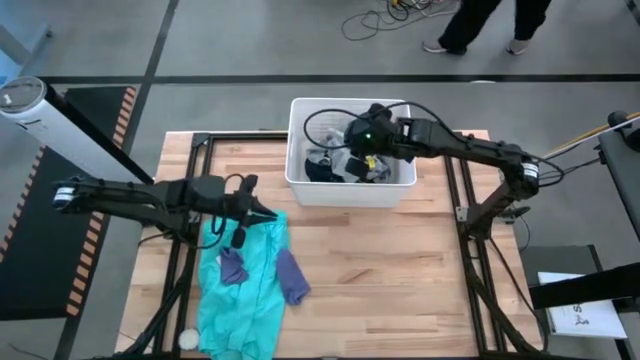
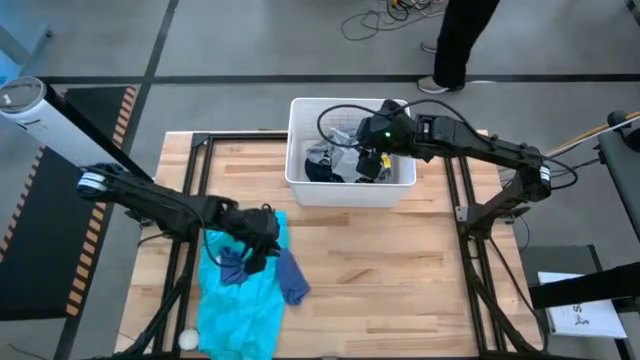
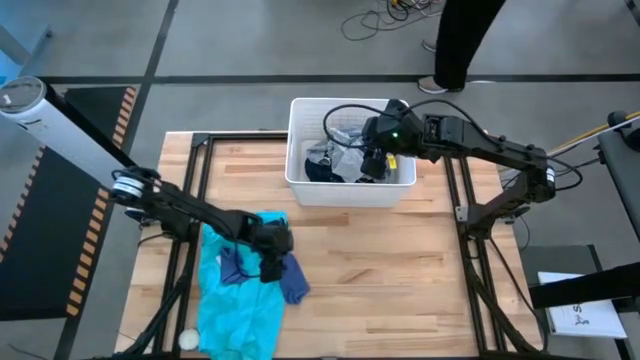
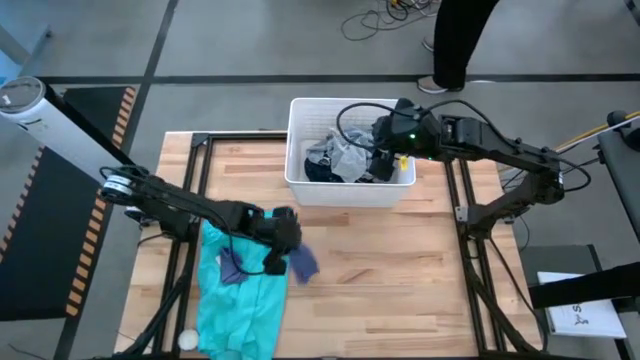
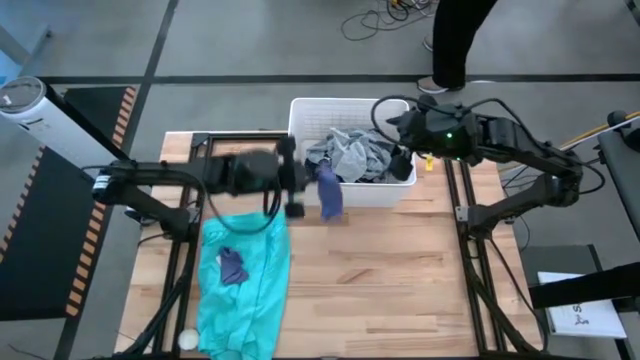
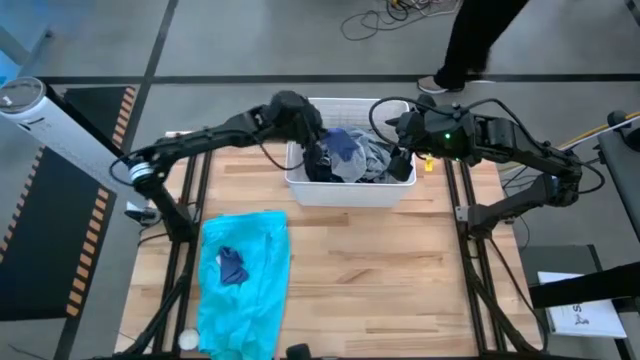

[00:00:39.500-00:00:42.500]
Task: Sort clothes
Put the right purple sock into the laundry bin

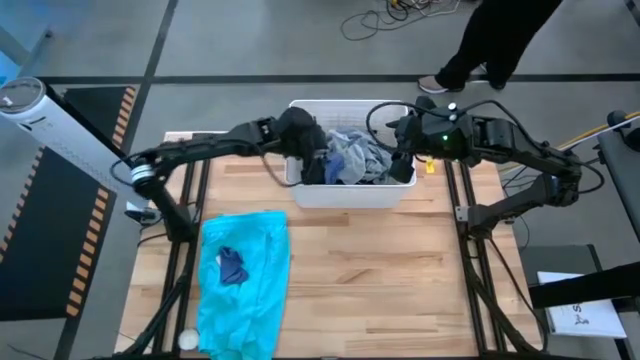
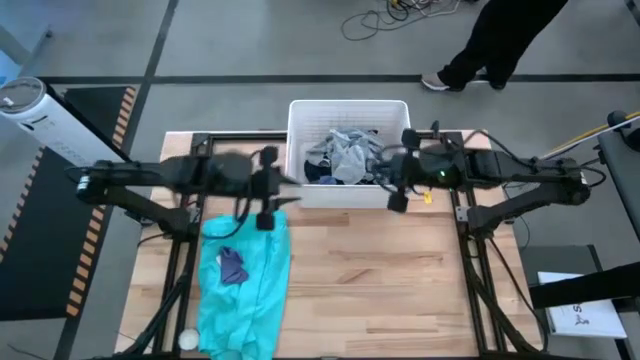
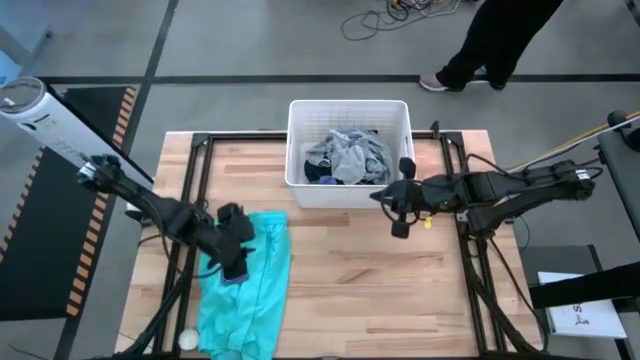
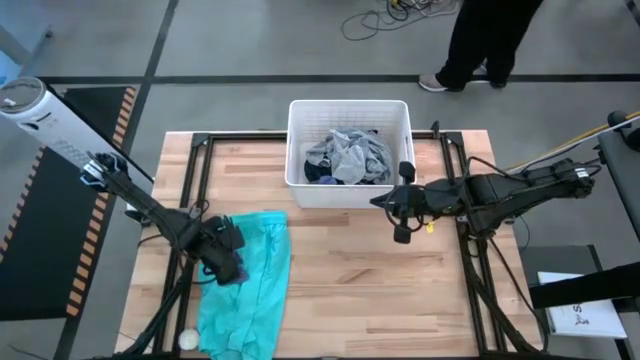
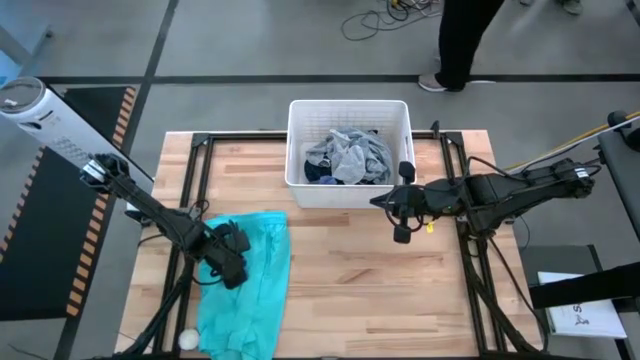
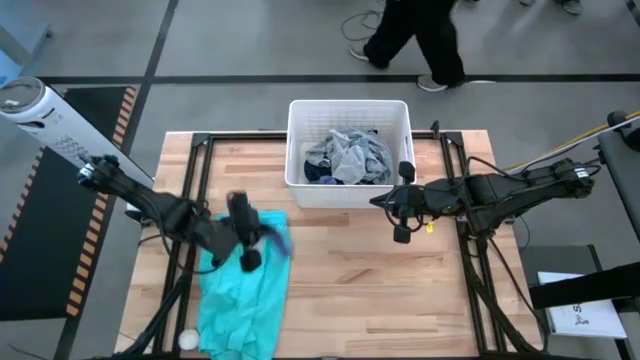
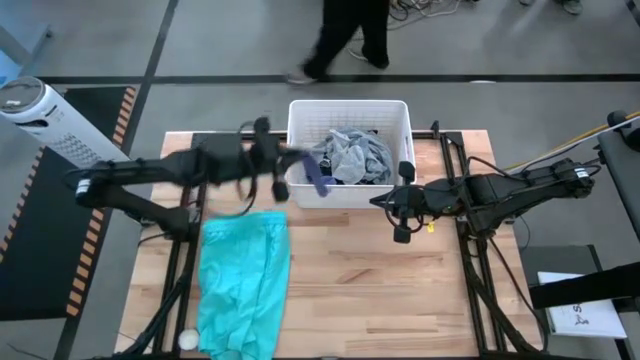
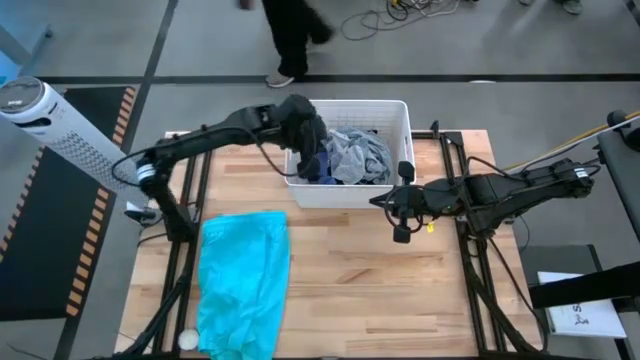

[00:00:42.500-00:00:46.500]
Put the purple sock into the laundry bin

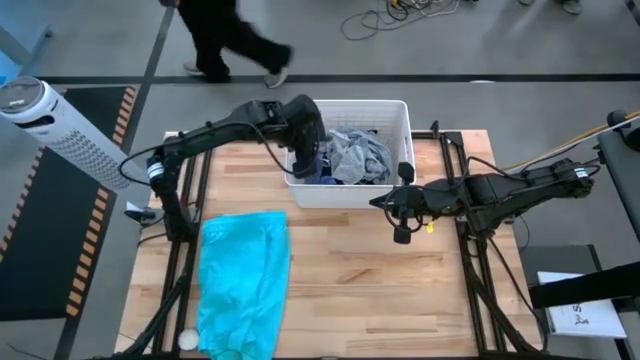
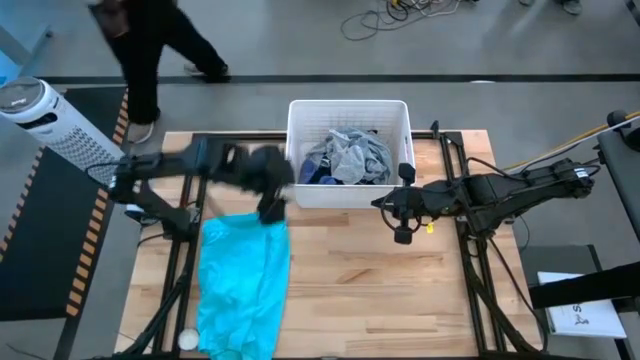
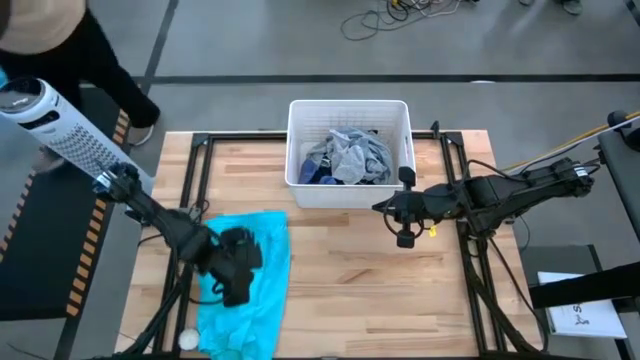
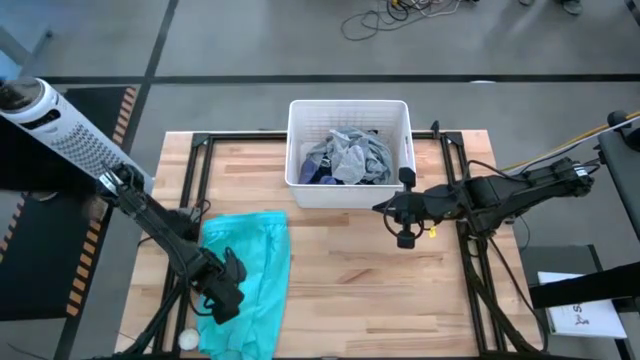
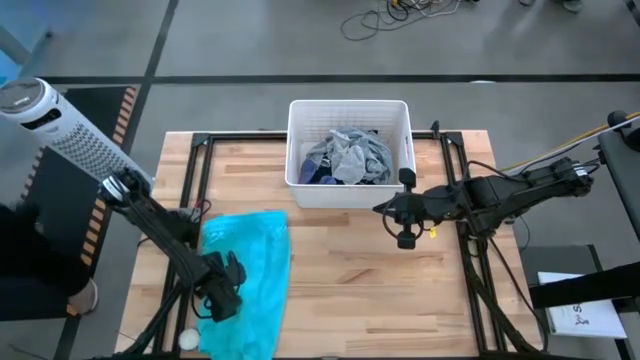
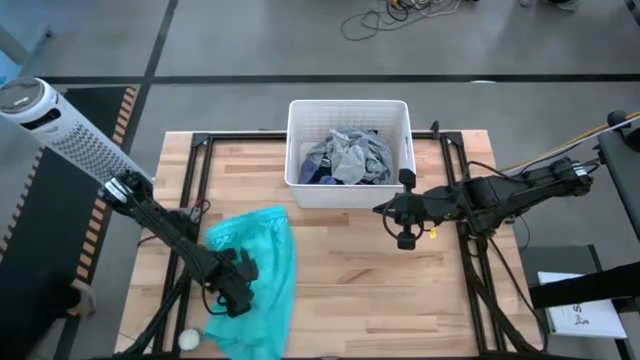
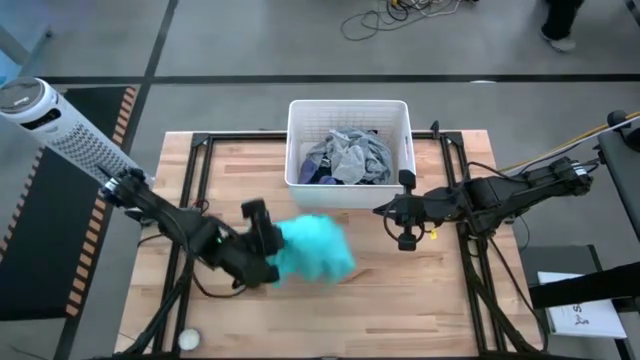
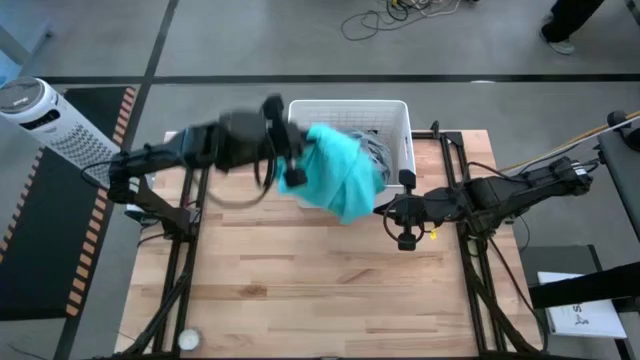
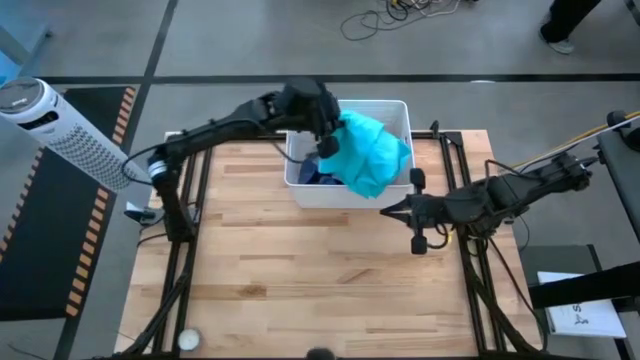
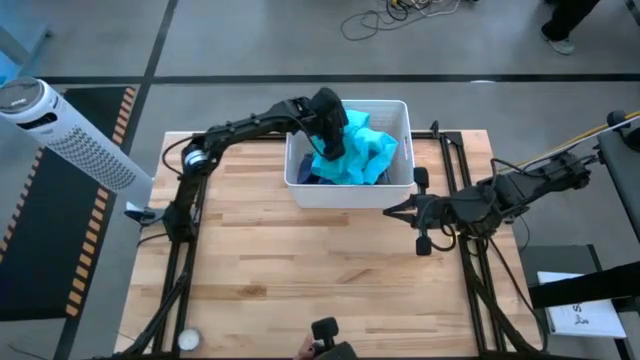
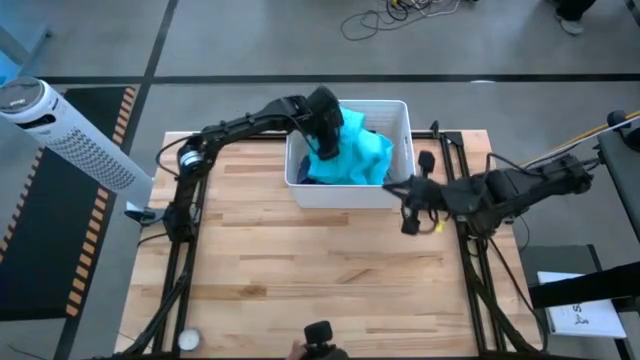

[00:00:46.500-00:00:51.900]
Put the light blue shorts into the laundry bin

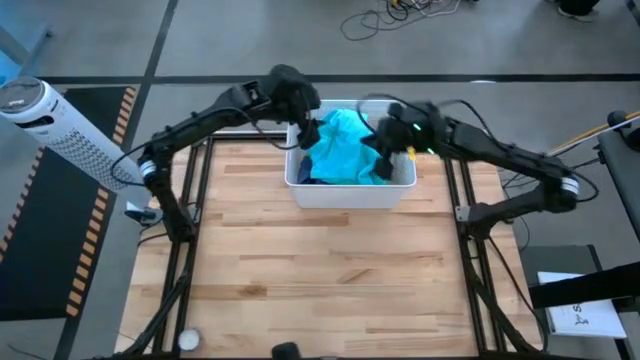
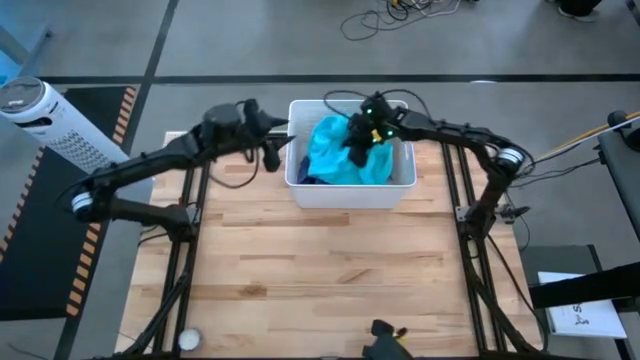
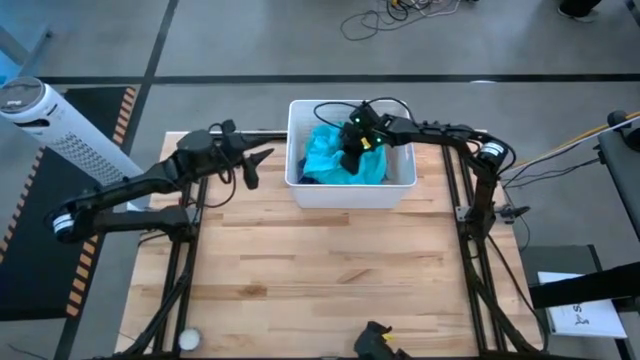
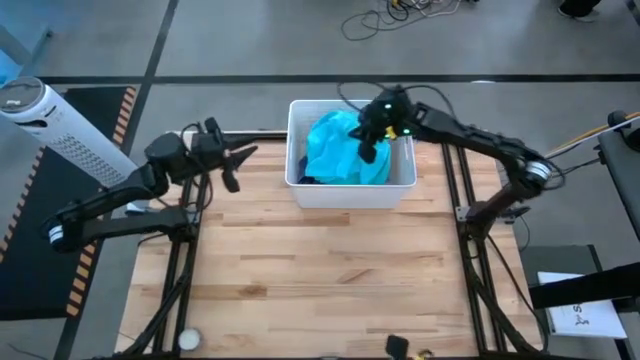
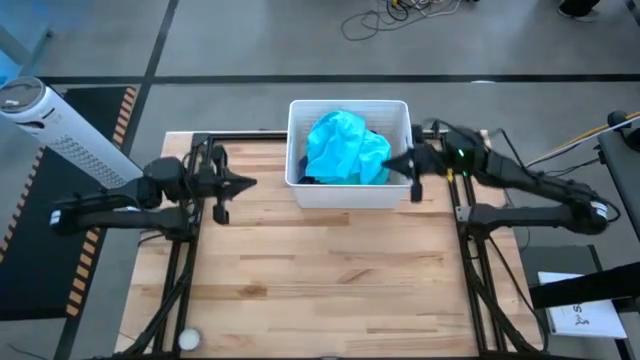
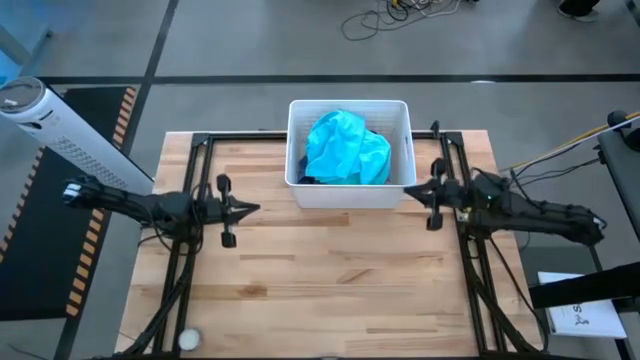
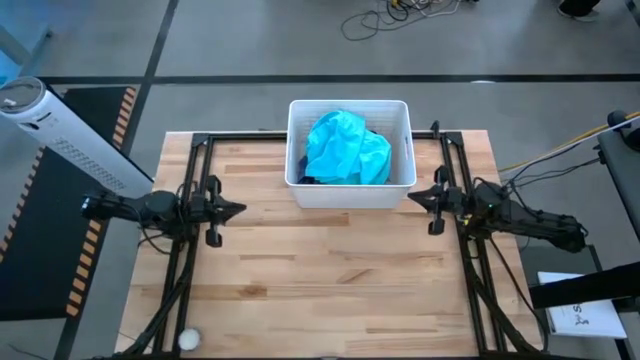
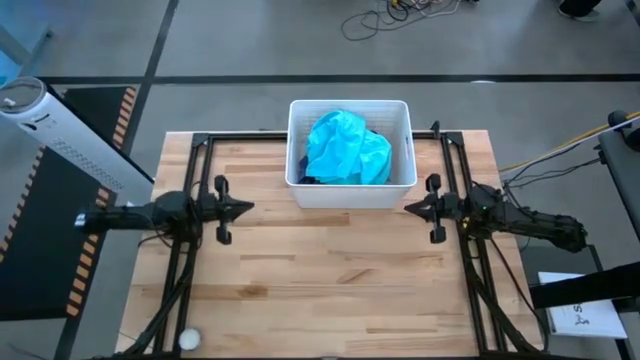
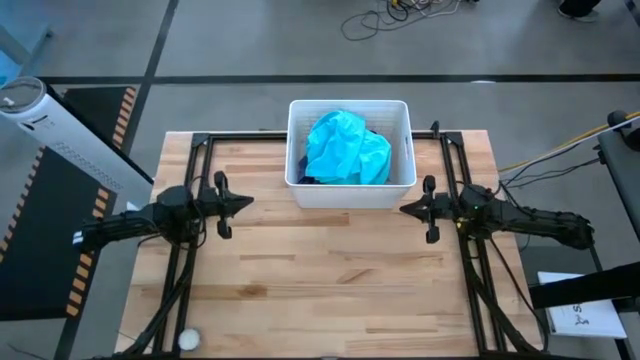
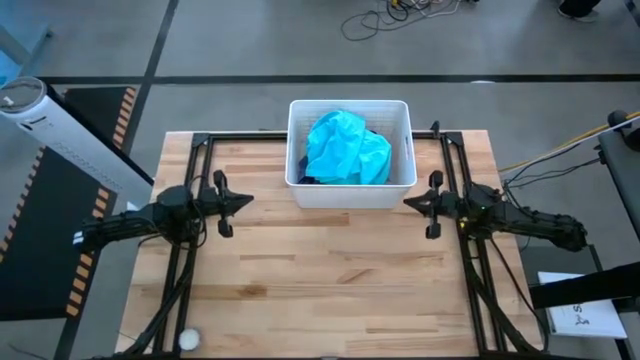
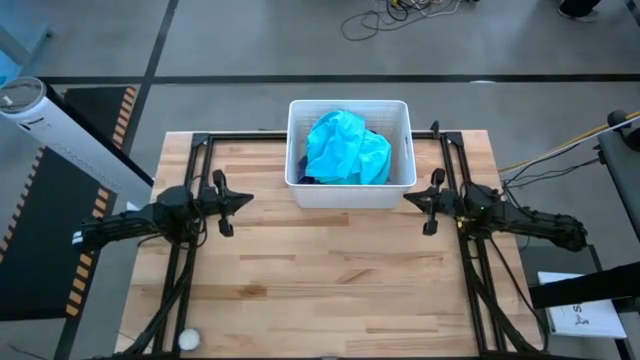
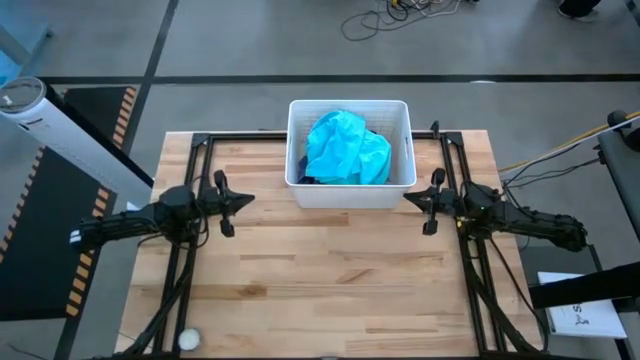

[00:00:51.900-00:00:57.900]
Return to Home Position

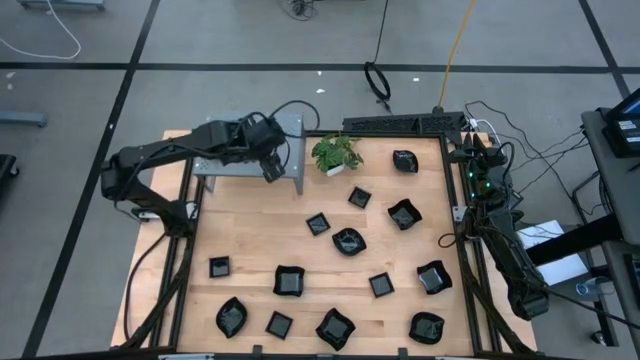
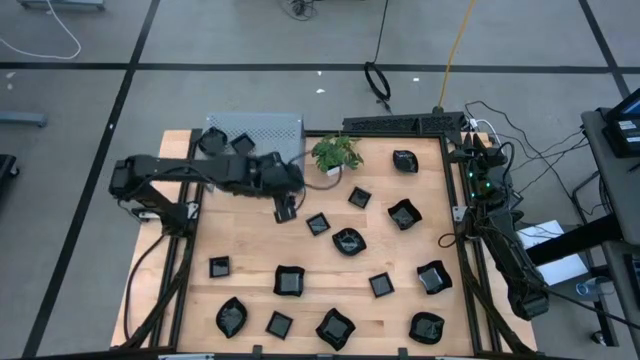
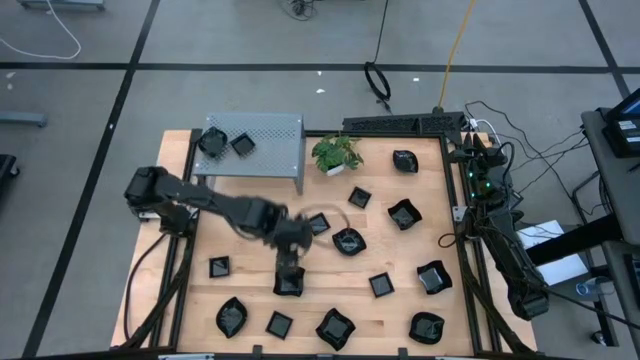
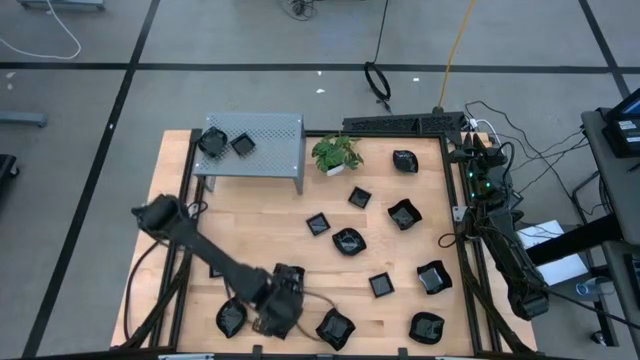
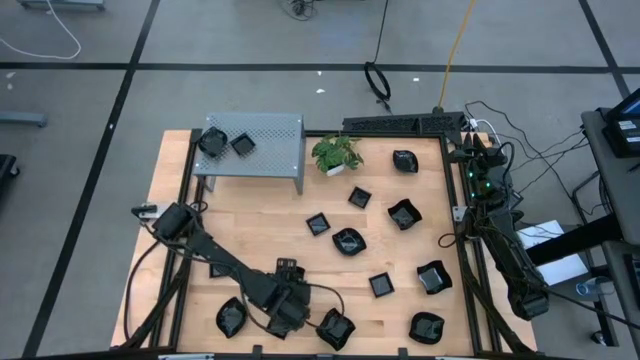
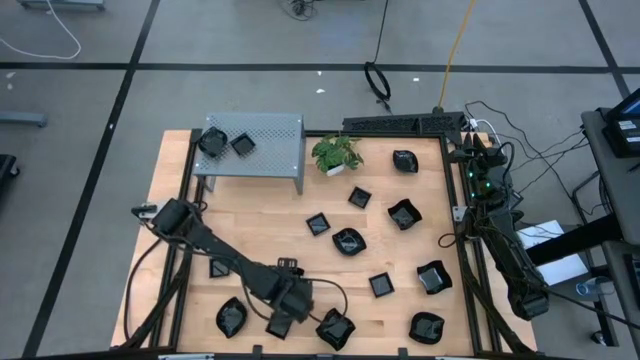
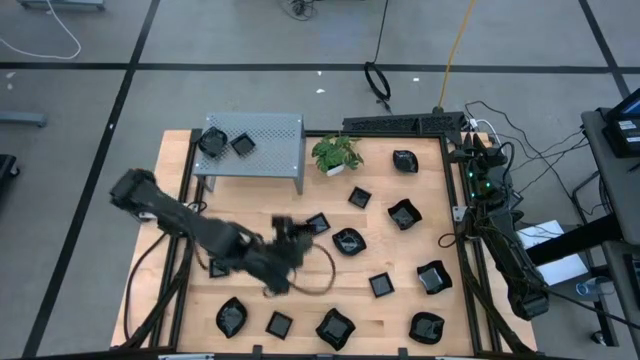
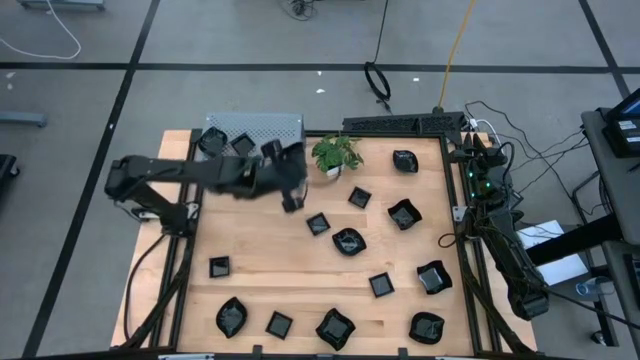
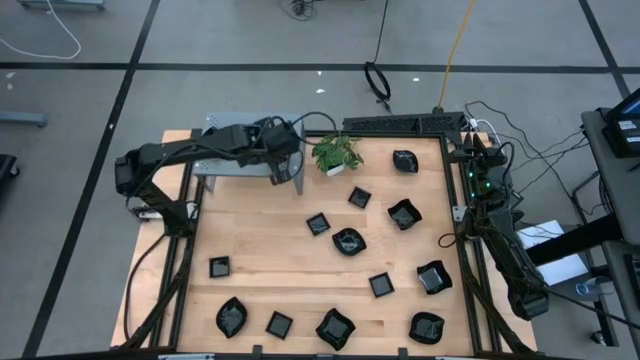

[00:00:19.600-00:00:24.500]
Task: Pick & Place Mini shaped plates
Put the black distorted square plate on the shelf
